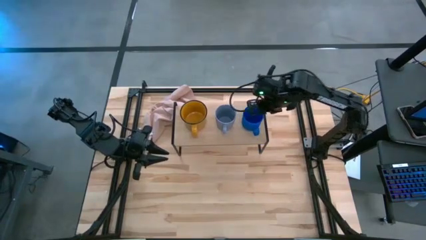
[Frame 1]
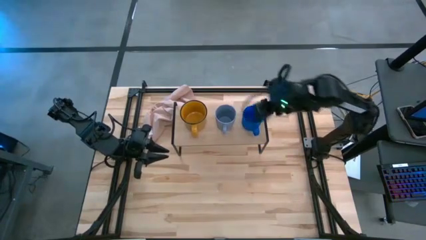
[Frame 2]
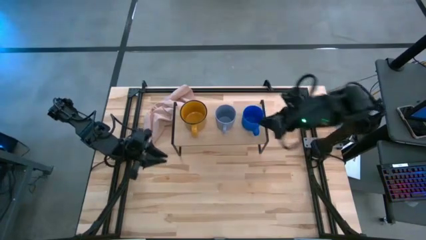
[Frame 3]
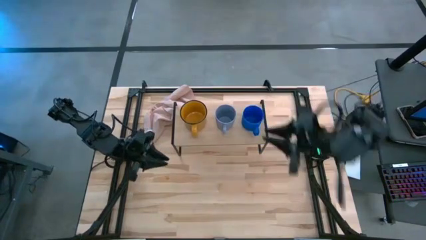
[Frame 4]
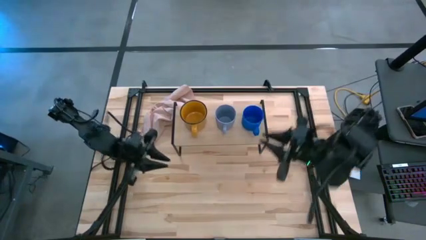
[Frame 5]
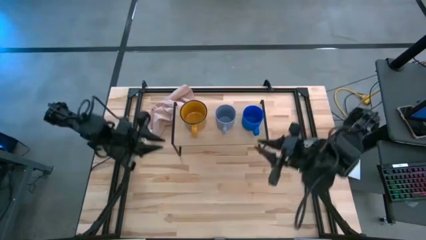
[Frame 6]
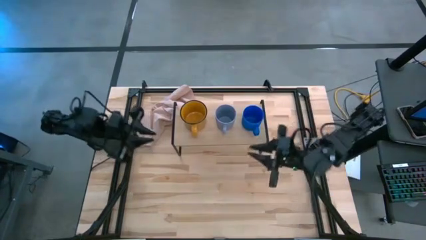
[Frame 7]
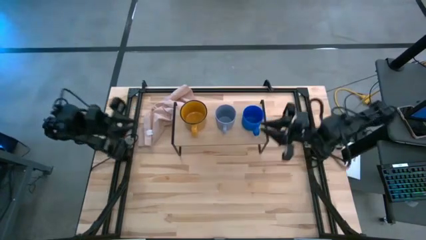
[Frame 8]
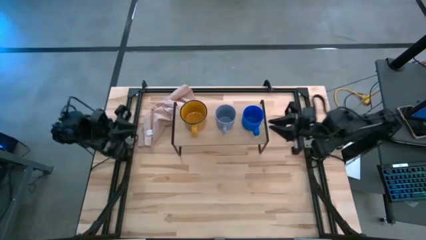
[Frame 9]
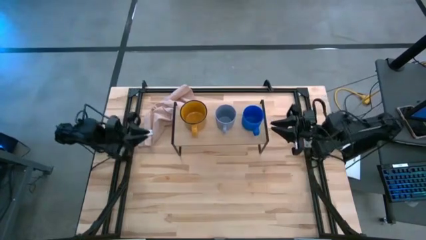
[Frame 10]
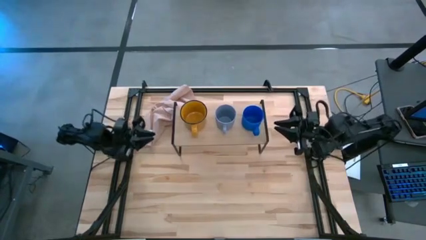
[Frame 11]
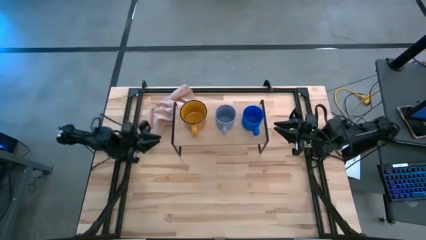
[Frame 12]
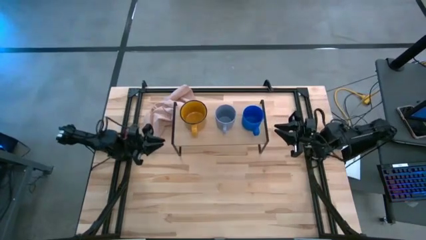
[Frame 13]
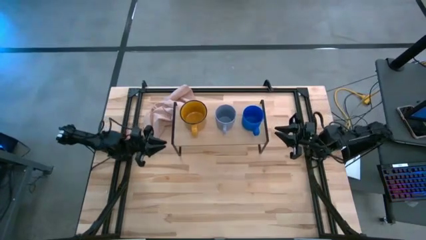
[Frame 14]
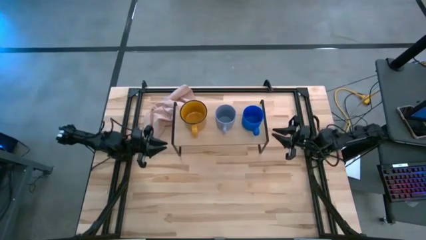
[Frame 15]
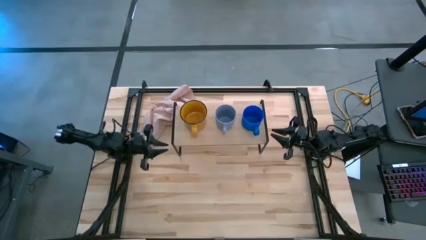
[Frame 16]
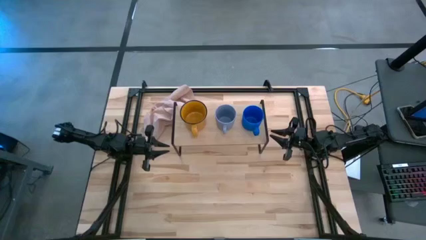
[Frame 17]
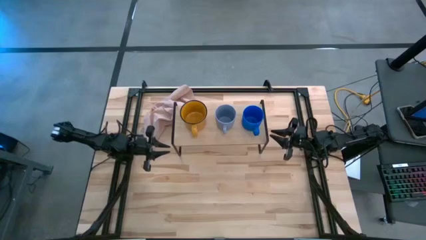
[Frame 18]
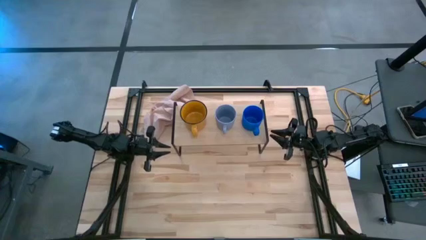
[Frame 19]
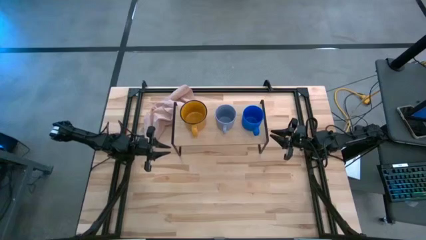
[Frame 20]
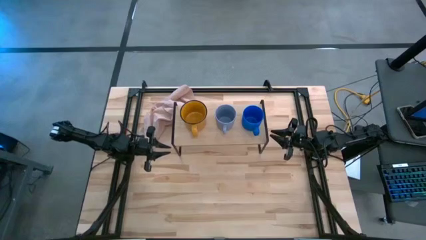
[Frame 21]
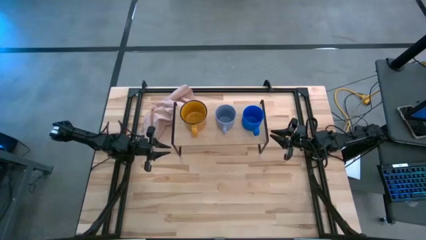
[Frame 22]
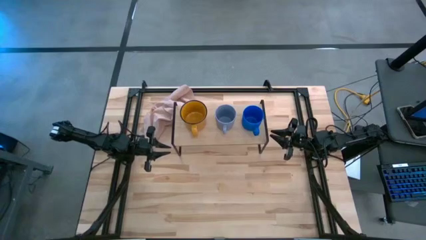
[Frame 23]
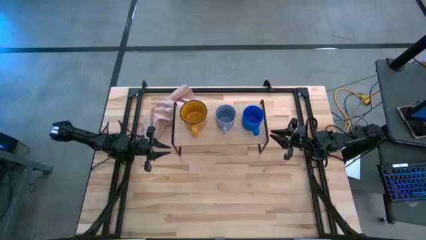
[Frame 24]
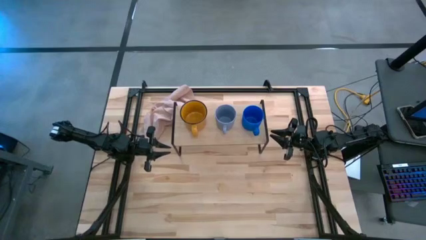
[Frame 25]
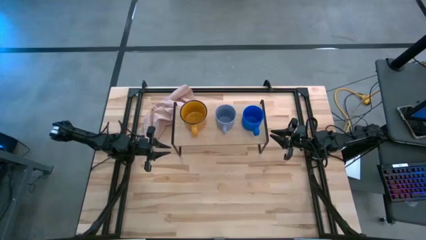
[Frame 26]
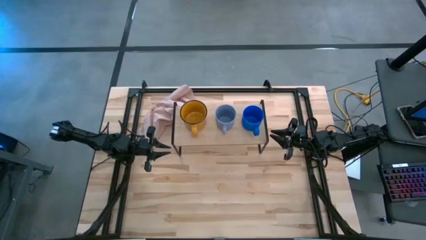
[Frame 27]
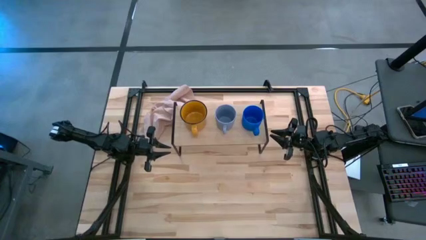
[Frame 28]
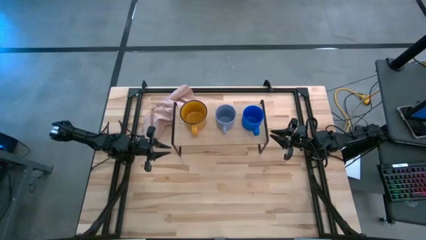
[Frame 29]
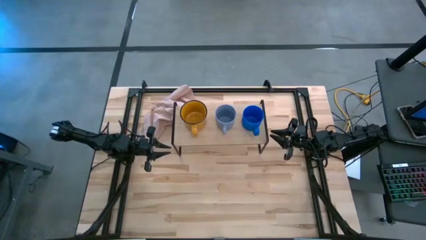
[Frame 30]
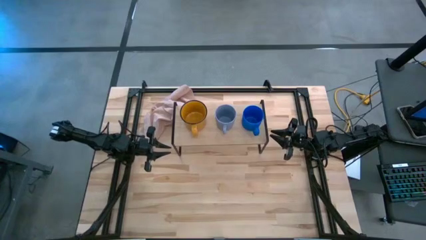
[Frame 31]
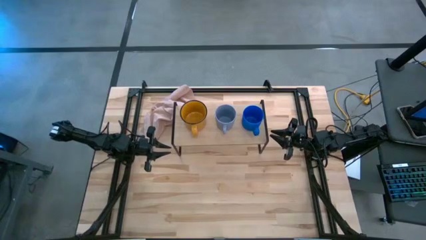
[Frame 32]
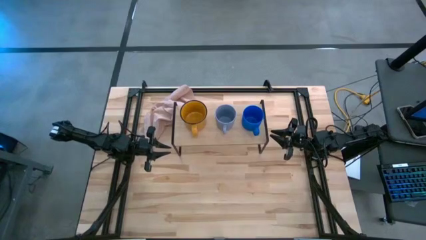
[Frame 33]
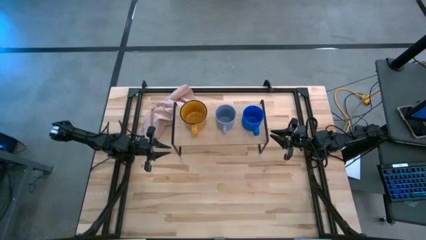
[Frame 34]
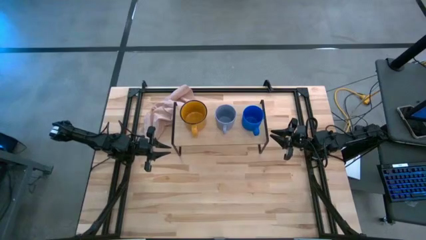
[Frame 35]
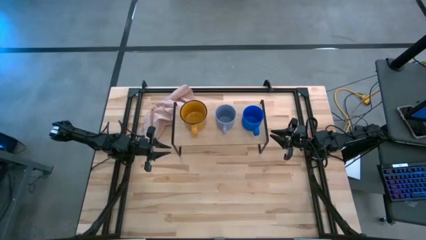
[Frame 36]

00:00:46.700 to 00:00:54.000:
Task: Stack small to large cups/mugs on shelf
Return to Home Position

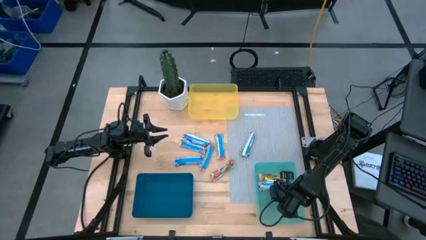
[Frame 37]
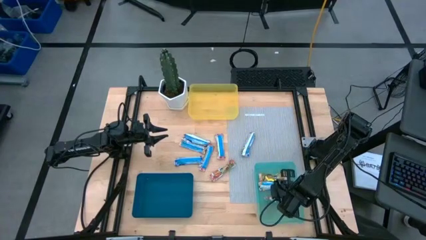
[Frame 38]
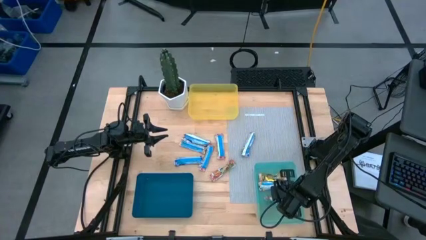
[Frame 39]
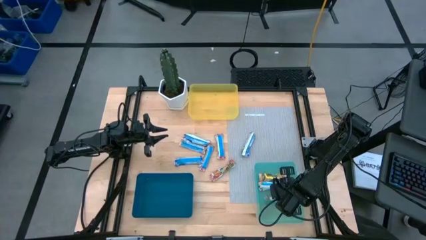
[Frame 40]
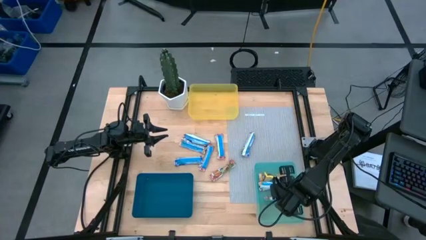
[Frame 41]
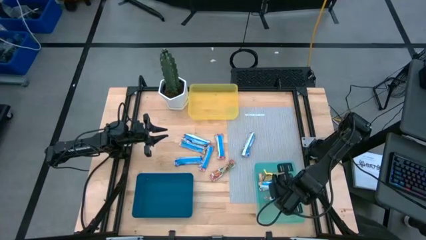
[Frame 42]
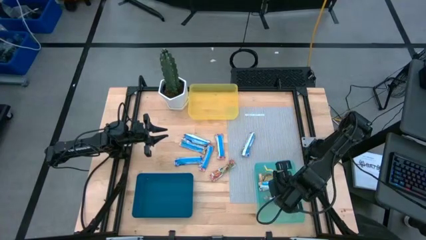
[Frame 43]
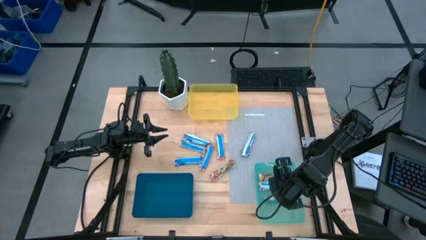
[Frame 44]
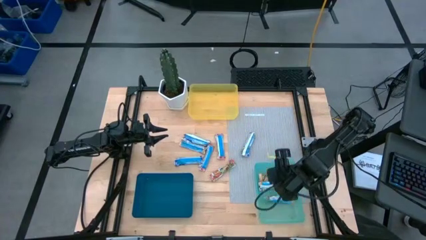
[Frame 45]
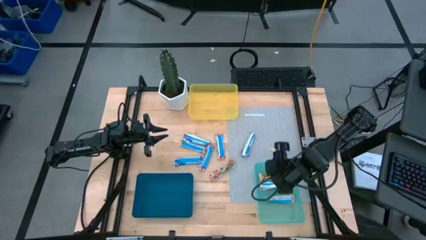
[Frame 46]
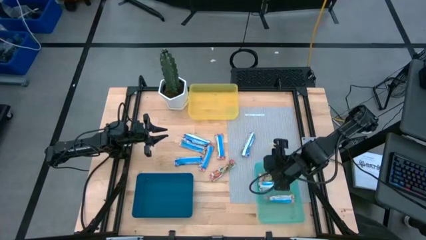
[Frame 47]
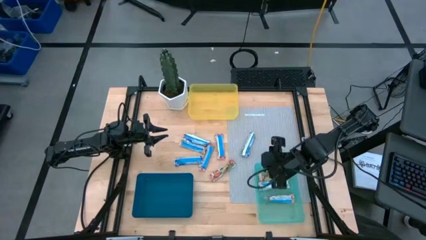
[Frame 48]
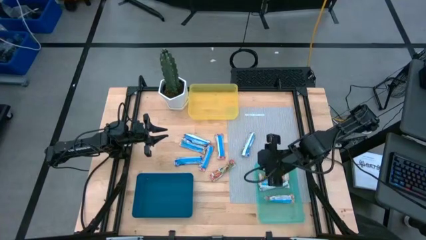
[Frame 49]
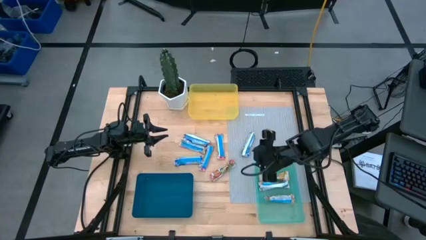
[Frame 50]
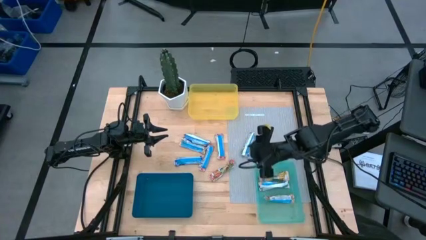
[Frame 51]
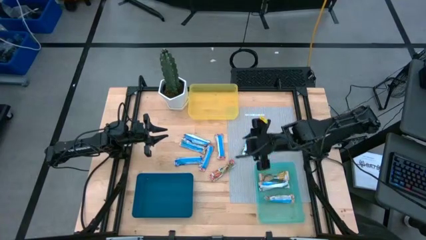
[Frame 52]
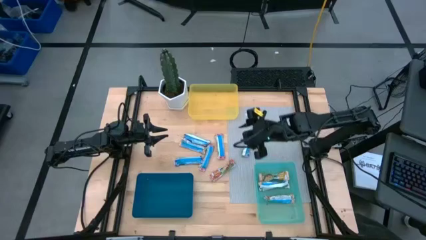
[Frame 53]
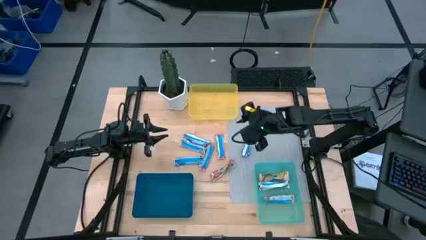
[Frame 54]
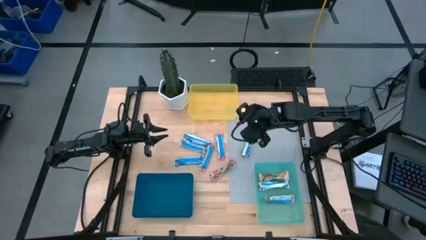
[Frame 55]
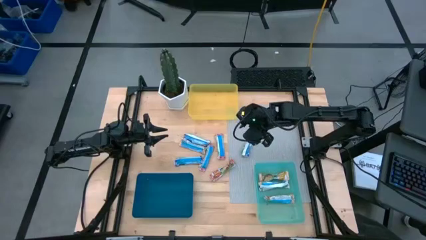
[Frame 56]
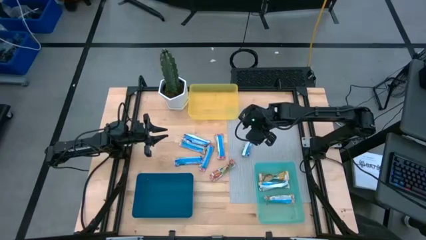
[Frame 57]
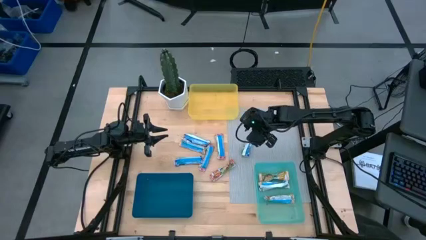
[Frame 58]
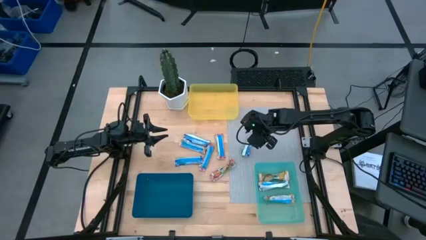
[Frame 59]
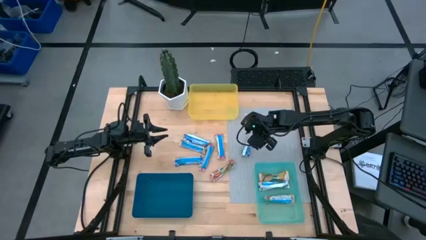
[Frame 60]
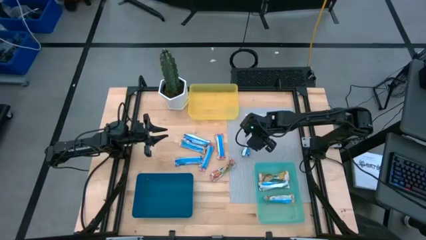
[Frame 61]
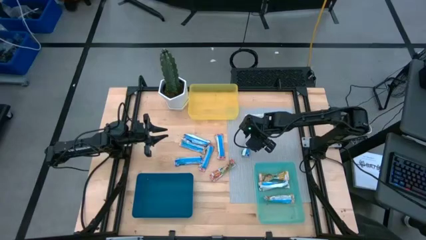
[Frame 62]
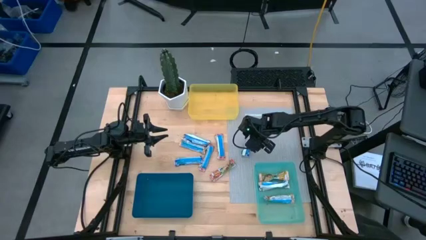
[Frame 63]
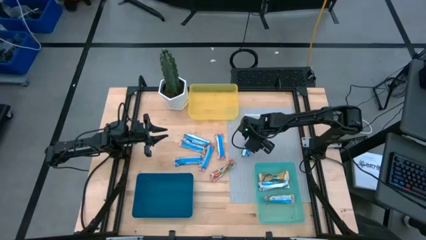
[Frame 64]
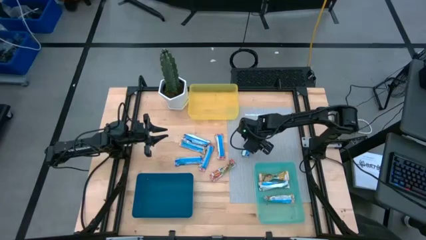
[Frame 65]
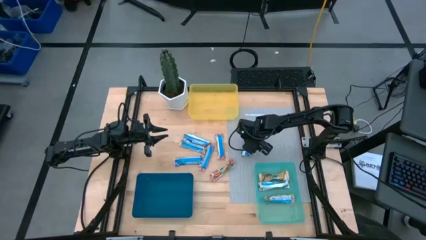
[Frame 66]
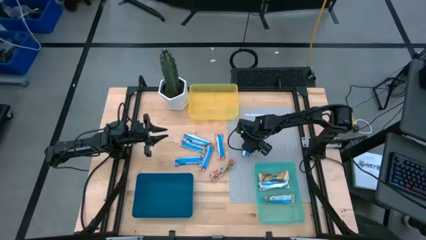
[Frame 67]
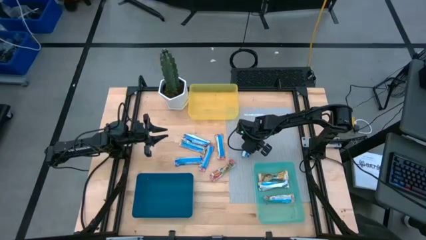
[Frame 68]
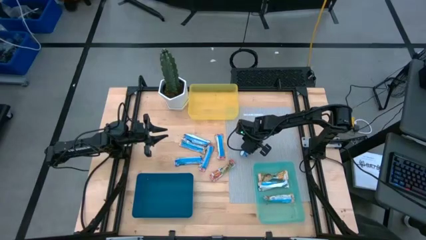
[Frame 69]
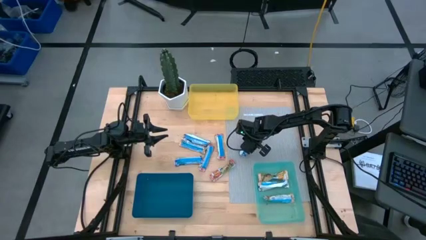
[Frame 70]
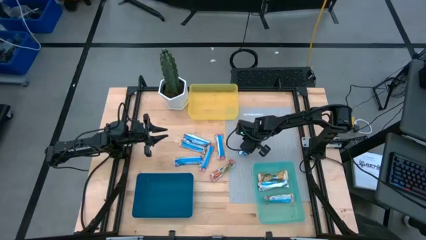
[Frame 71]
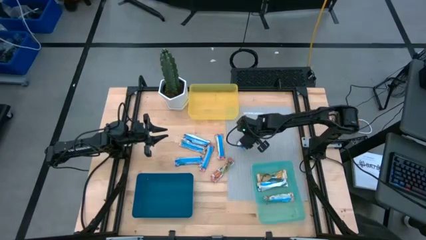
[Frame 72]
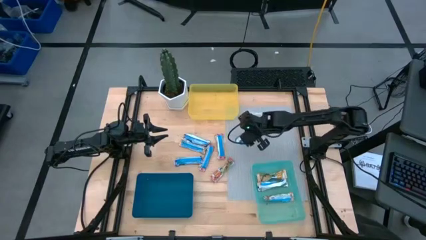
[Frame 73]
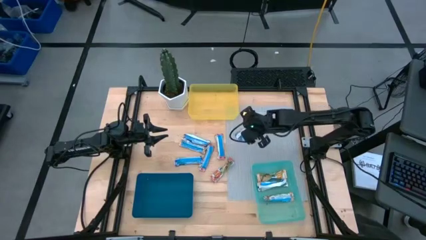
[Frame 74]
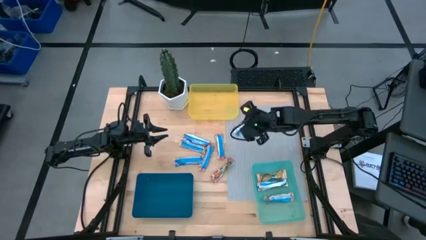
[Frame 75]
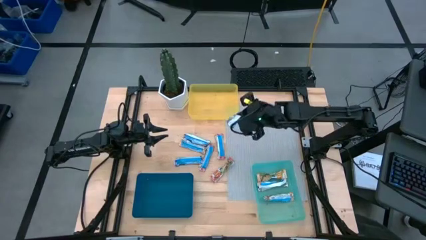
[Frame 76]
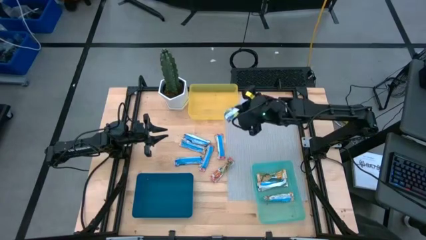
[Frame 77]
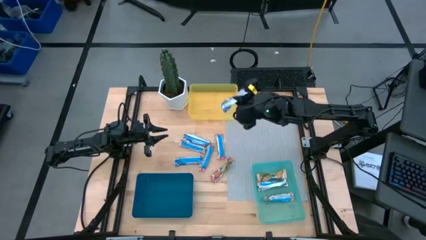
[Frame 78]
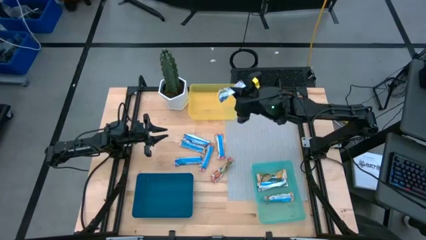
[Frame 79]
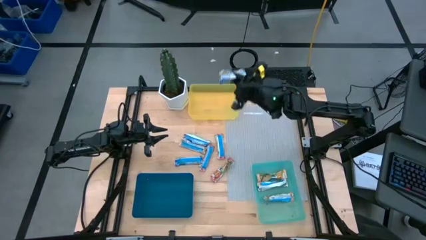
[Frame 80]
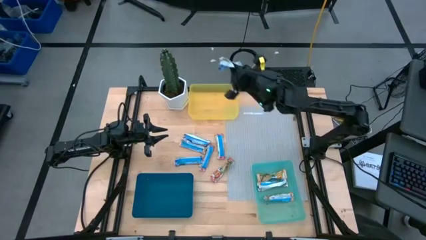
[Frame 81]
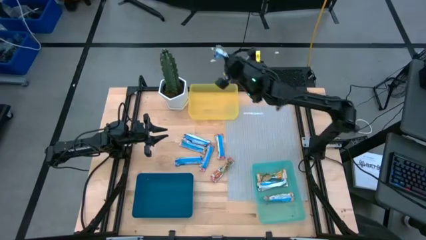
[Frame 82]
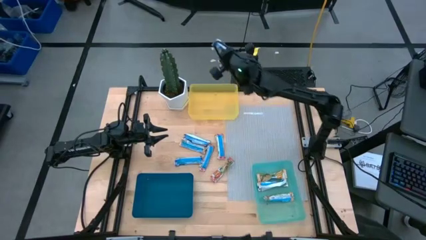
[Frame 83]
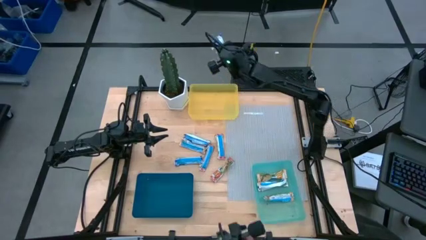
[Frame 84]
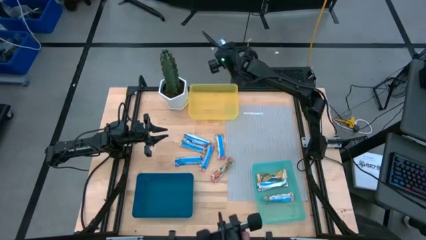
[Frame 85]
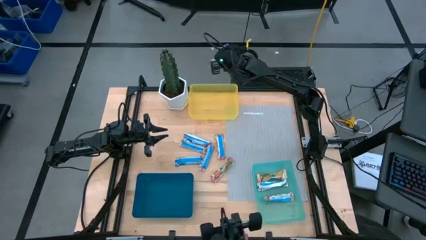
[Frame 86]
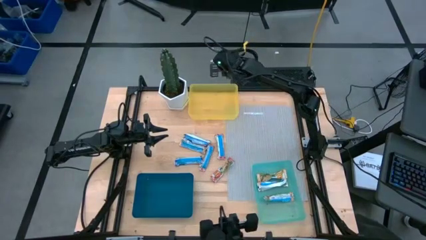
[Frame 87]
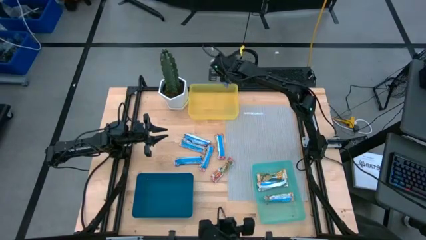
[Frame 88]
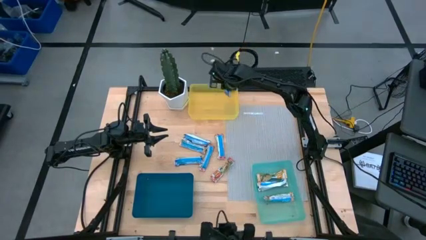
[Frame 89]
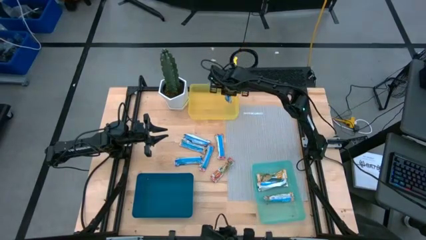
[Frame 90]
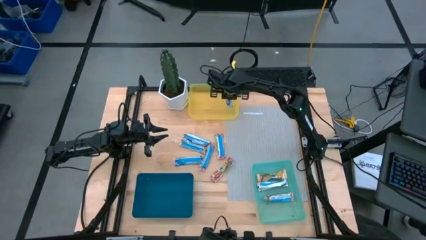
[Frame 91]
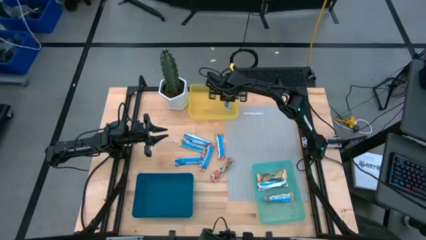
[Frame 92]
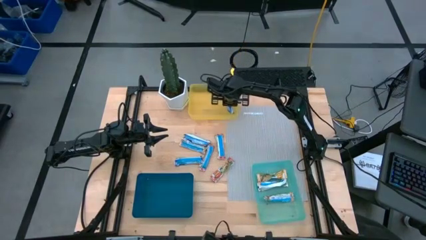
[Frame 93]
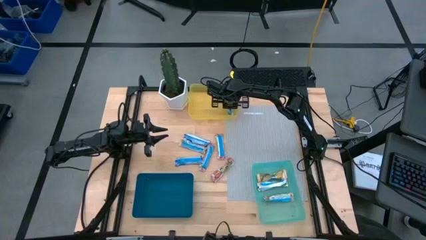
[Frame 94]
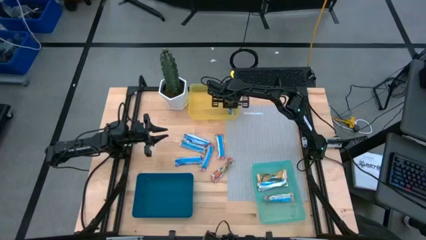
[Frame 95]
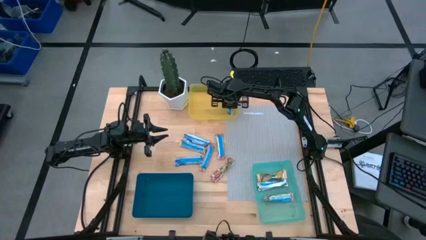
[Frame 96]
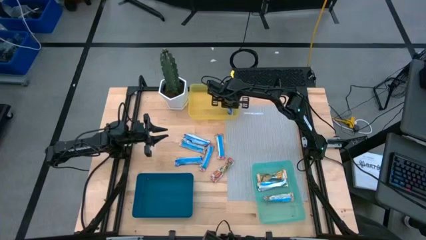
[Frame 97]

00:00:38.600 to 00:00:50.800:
Task: Pick and place Granola Bars by type
Put the blue granola bar into the yellow bin
